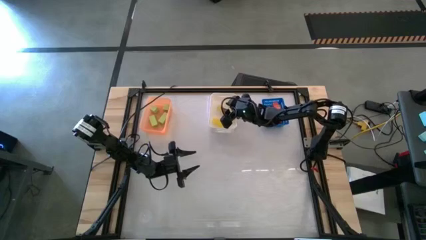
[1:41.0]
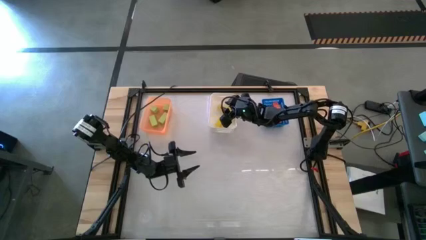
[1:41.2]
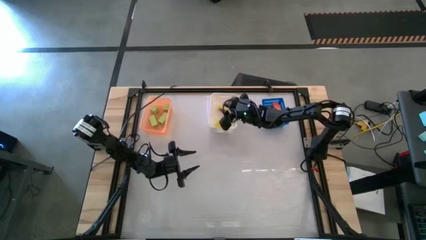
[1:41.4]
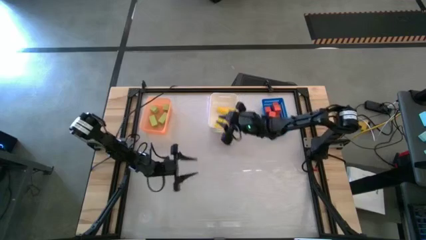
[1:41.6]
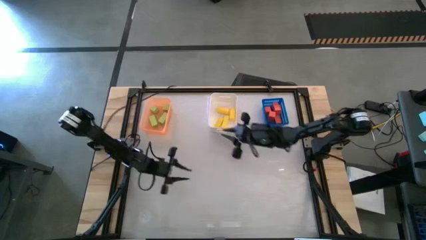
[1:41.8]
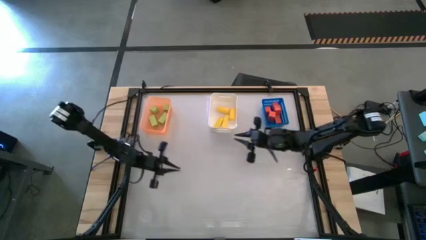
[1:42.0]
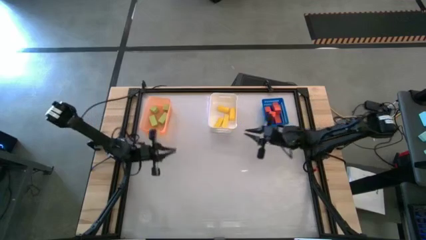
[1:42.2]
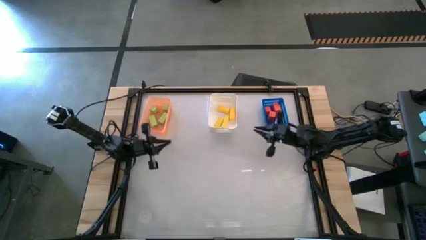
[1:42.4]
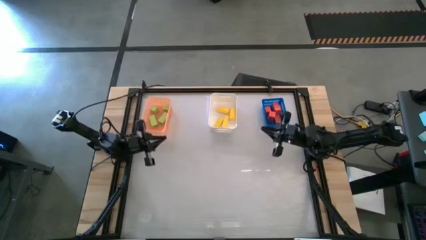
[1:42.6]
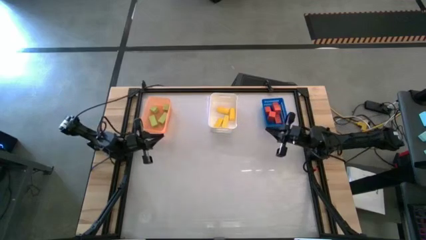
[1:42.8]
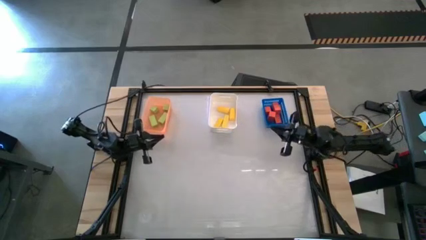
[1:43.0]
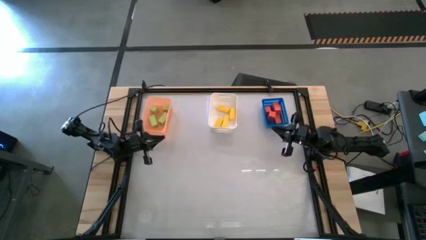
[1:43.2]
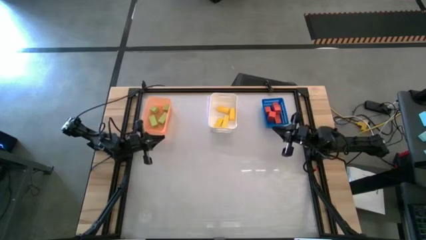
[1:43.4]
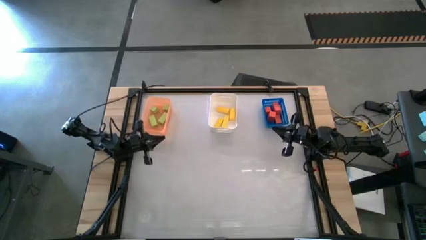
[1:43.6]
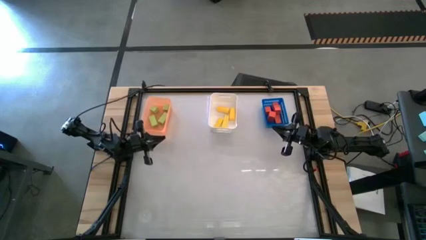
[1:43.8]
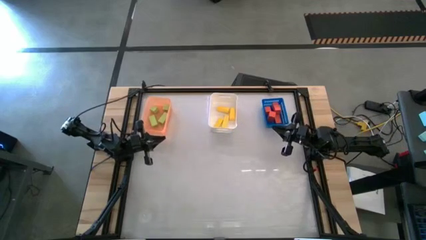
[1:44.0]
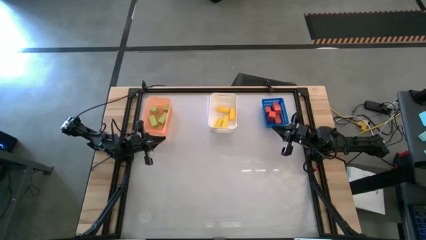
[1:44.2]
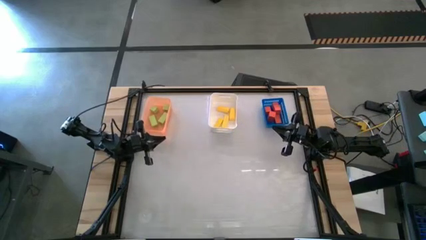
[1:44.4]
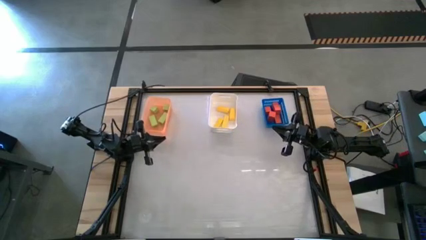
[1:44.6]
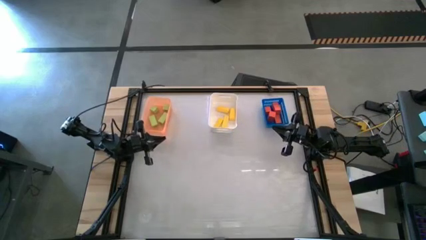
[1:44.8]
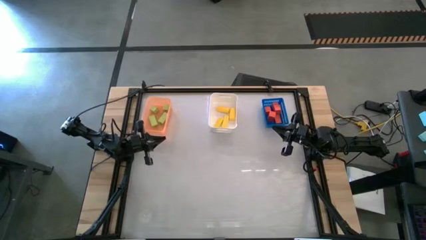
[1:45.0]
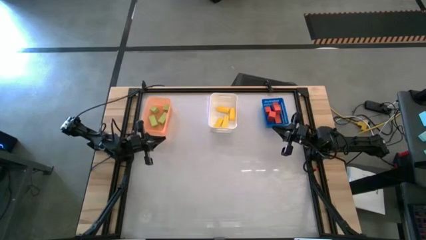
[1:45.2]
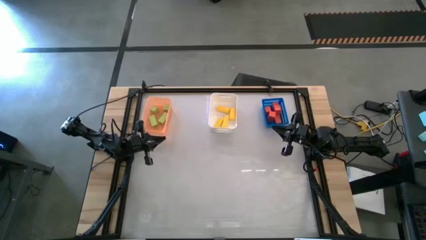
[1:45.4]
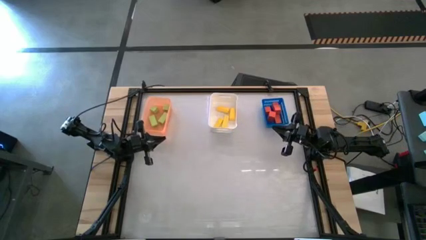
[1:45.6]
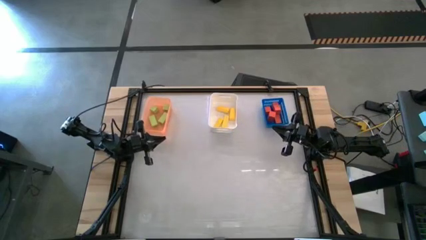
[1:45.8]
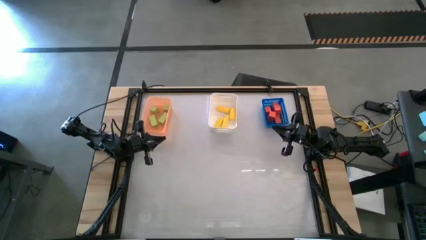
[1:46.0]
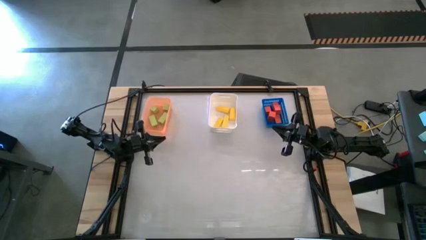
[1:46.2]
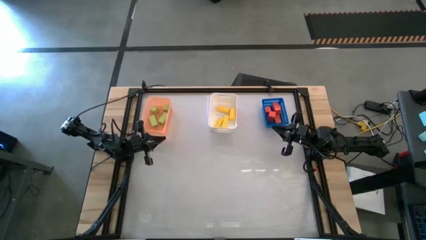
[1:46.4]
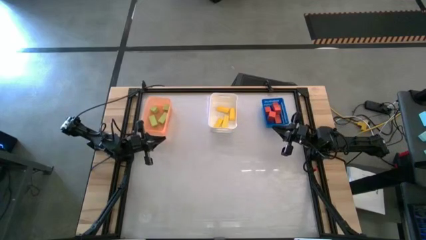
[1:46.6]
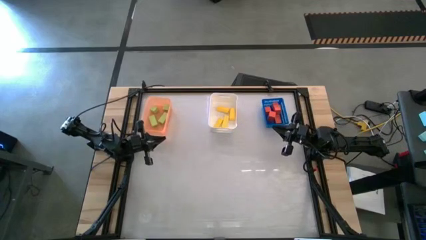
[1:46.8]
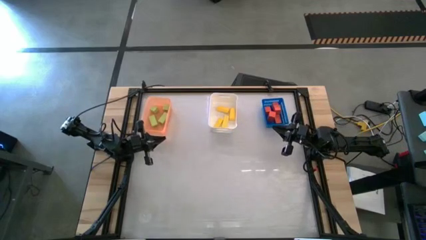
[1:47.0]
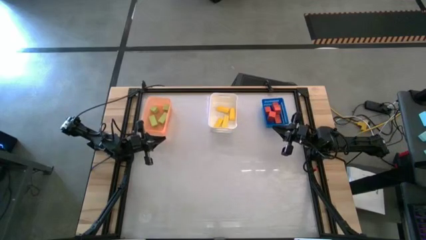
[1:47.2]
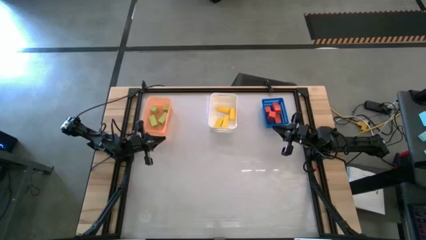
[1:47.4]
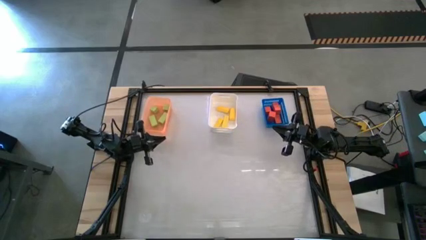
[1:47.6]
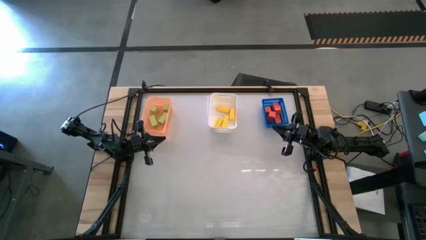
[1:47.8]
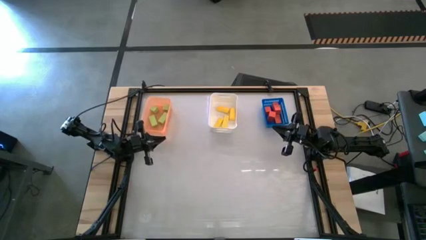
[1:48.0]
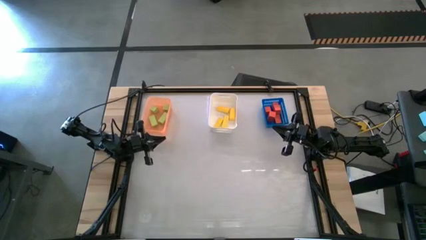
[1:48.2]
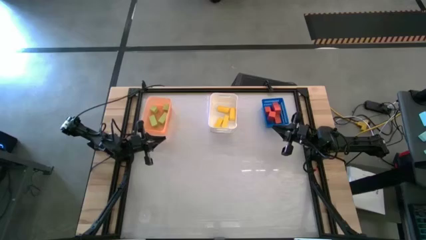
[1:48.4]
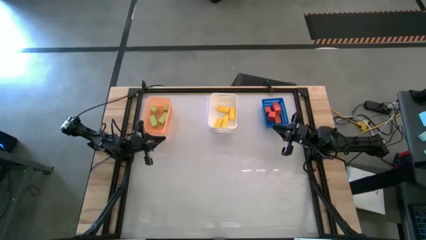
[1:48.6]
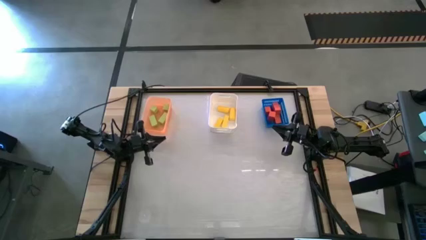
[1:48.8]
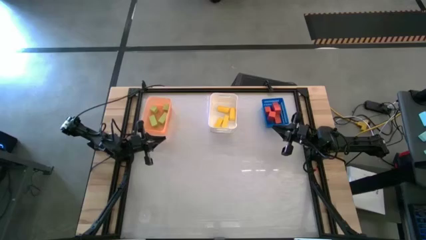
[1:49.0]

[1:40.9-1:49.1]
Task: Sort & place blocks by color
Return to Home Position

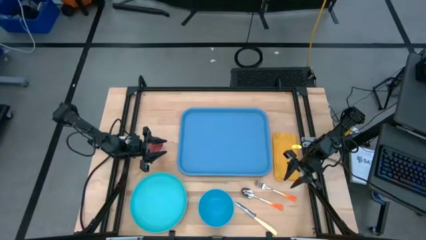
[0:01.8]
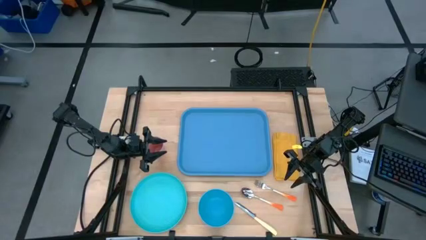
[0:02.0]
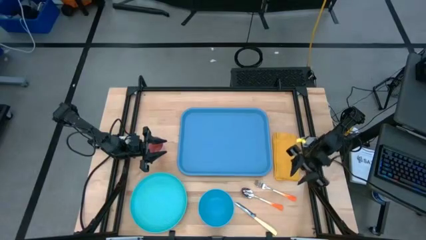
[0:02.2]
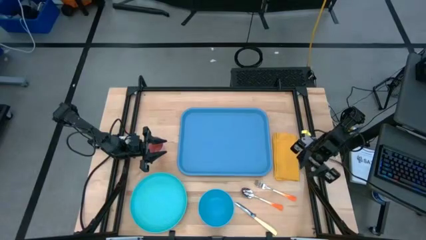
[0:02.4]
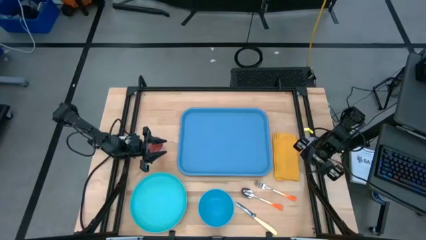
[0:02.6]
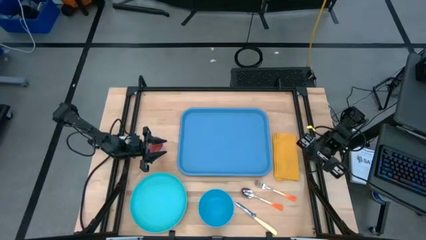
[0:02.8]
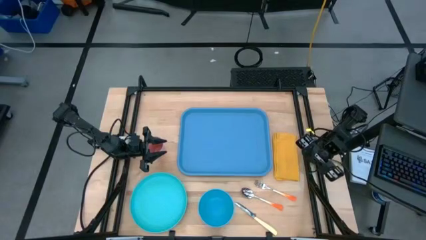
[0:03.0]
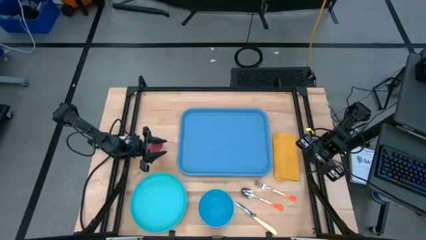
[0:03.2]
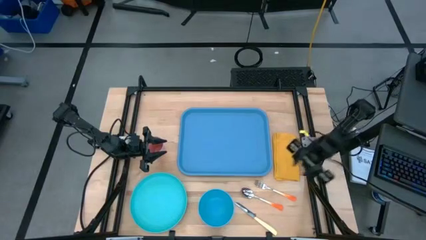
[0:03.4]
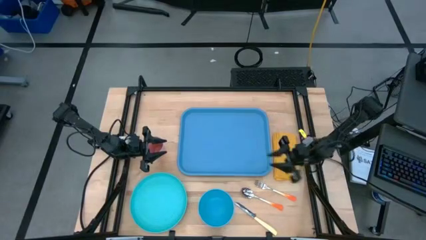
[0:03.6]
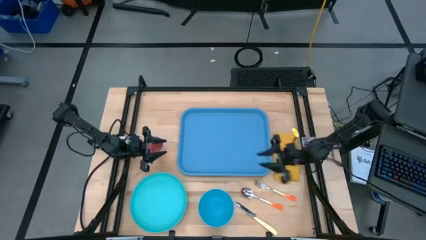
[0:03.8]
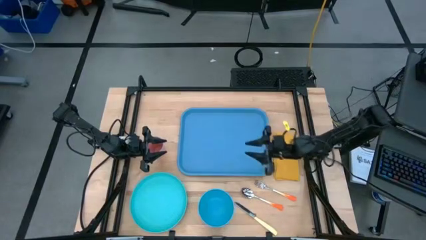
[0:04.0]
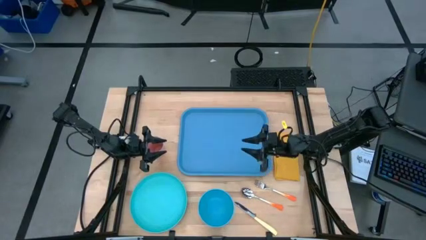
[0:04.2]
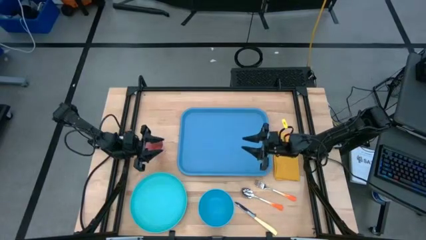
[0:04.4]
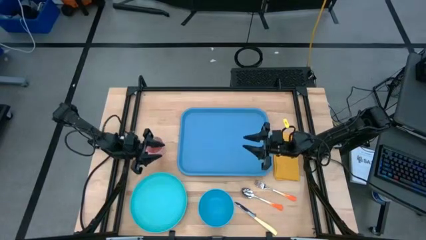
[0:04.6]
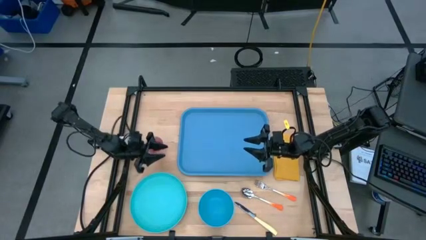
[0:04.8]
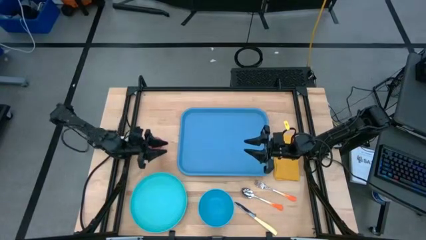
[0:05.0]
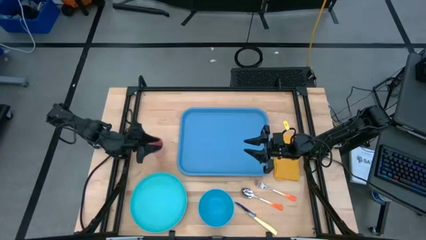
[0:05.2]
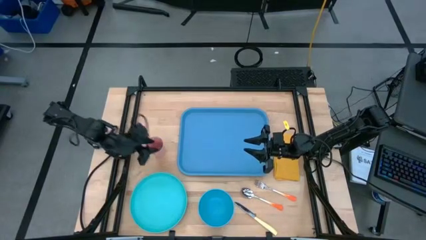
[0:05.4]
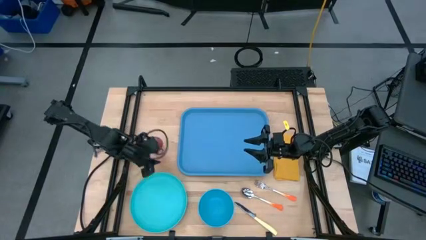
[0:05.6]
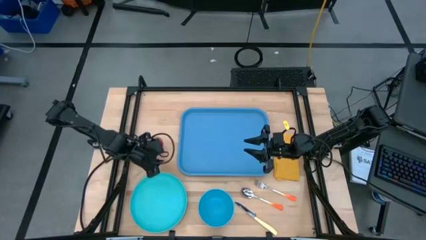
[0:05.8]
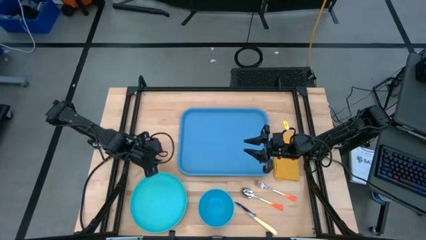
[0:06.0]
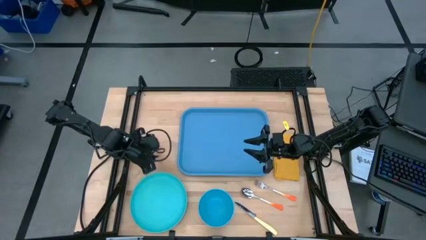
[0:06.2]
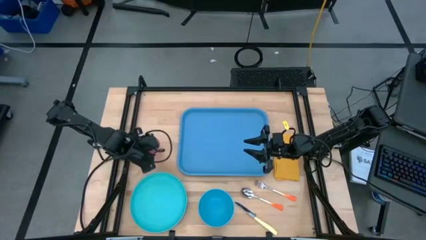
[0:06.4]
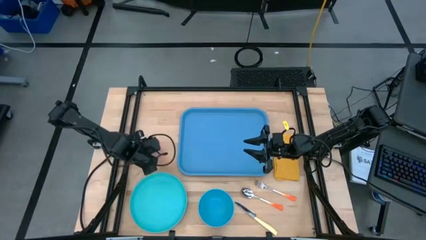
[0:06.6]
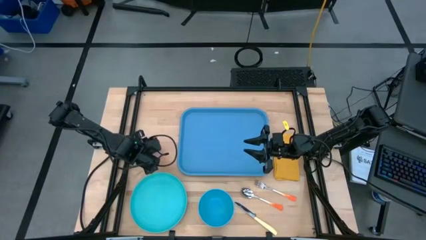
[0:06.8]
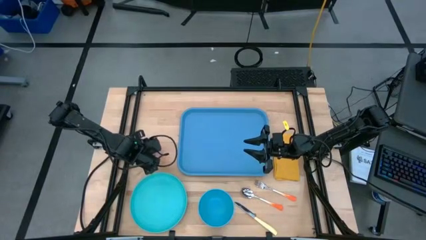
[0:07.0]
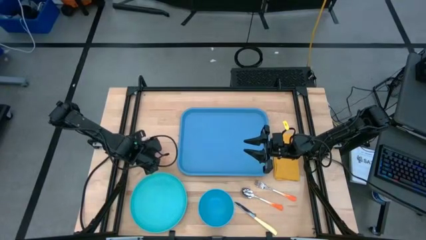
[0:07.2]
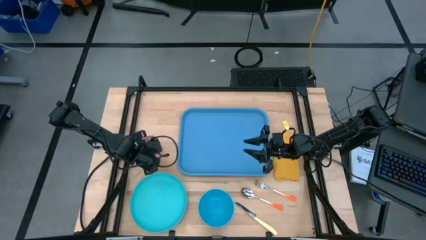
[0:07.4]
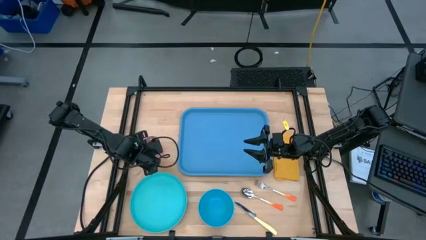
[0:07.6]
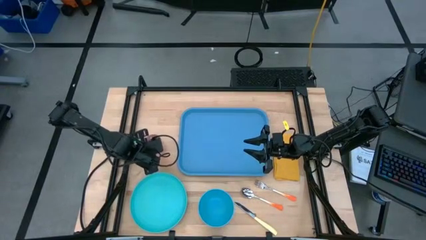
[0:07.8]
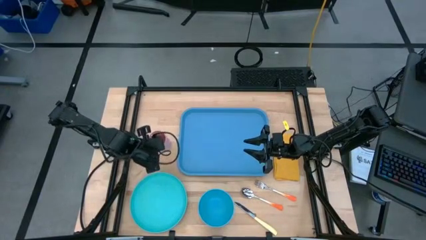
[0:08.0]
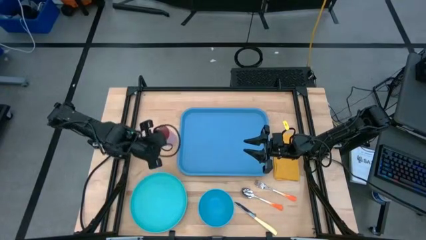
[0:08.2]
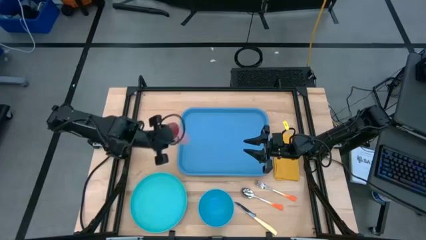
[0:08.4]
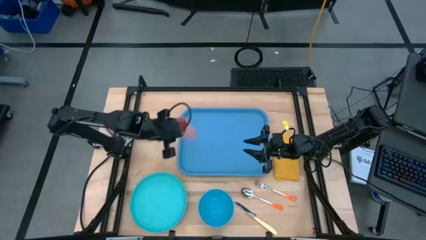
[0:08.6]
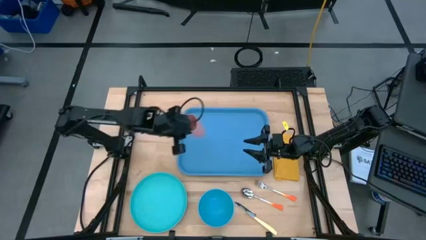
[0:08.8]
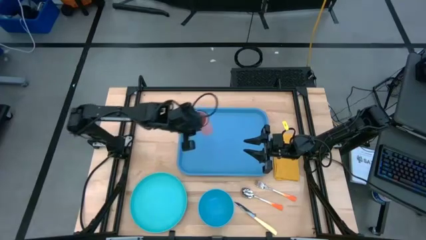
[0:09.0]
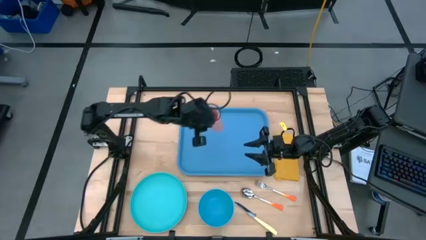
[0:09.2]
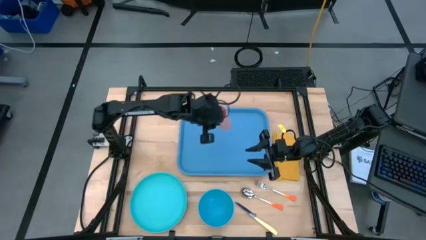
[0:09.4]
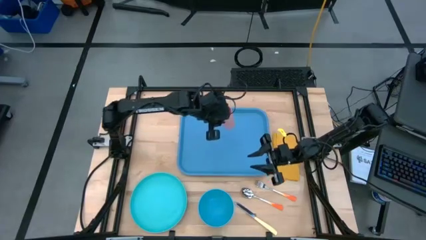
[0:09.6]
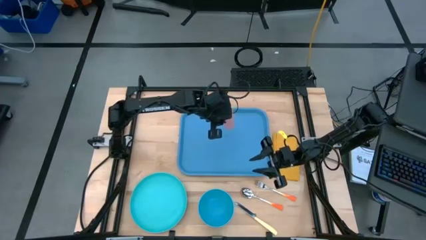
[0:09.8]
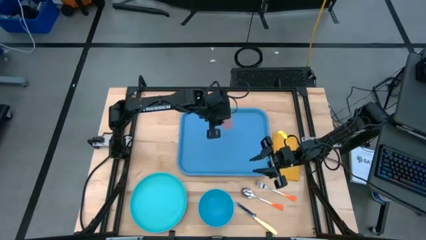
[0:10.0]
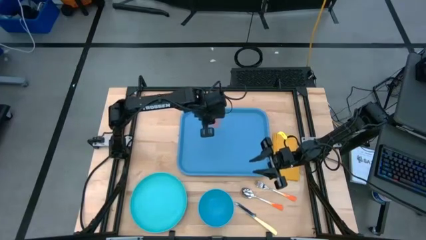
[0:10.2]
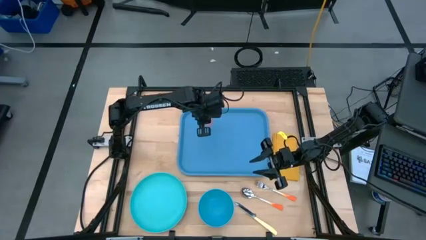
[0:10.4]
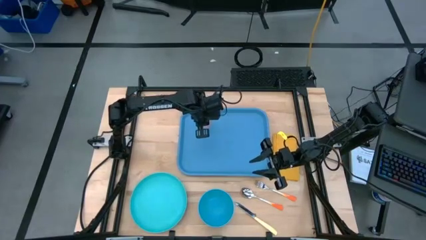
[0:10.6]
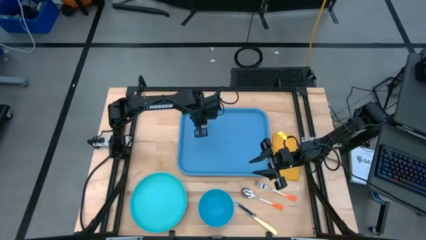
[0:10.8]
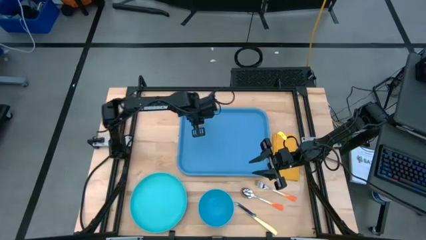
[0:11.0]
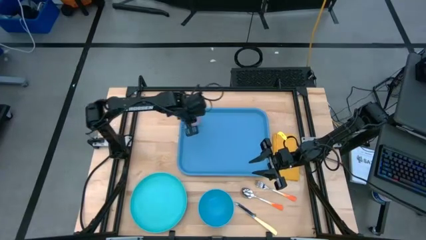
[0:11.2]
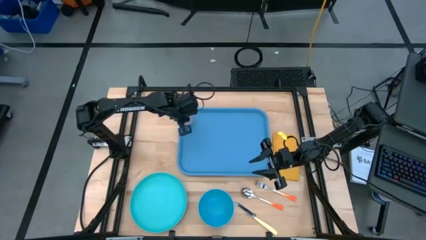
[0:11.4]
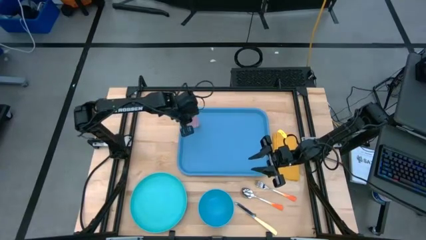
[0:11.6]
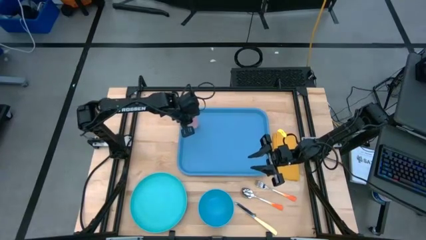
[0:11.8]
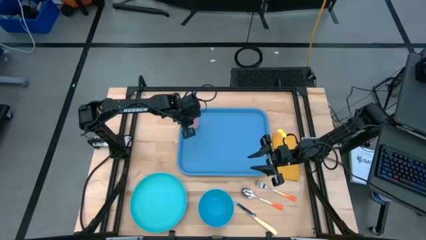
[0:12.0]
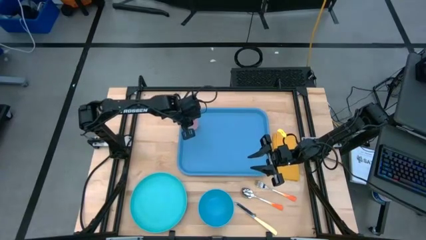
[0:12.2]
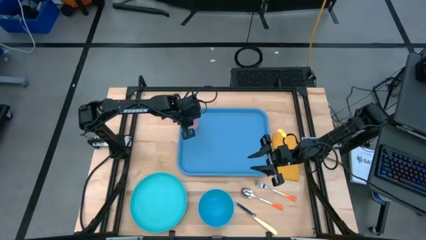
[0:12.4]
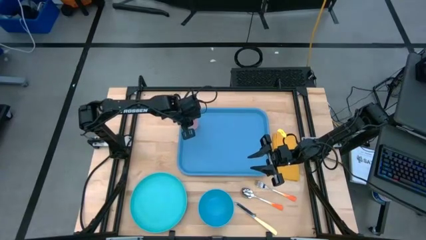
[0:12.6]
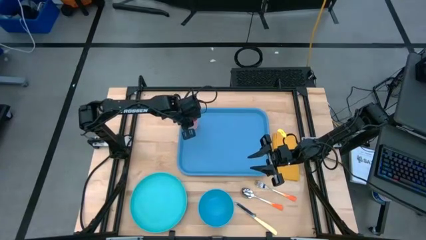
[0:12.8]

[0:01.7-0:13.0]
Task: Set up tray
Put the pink cup on the blue serving tray
